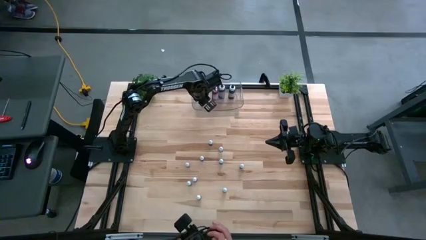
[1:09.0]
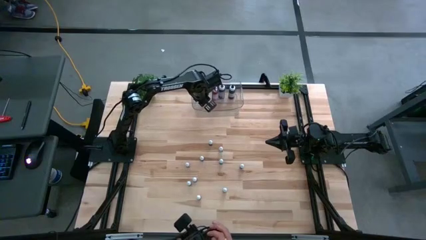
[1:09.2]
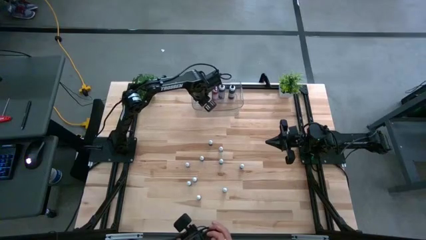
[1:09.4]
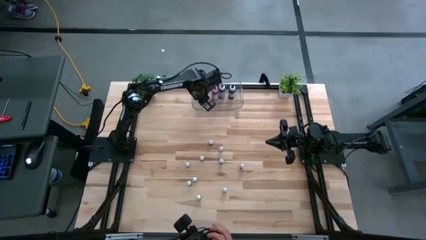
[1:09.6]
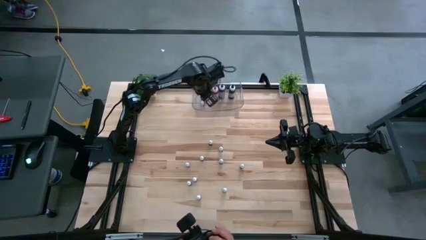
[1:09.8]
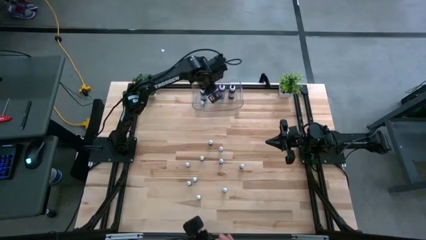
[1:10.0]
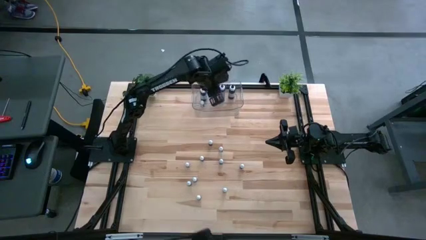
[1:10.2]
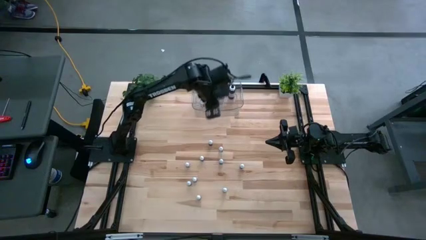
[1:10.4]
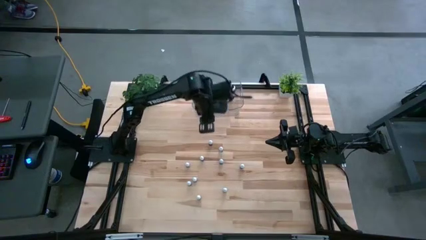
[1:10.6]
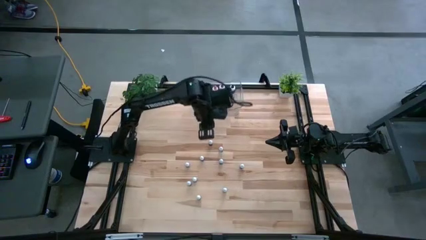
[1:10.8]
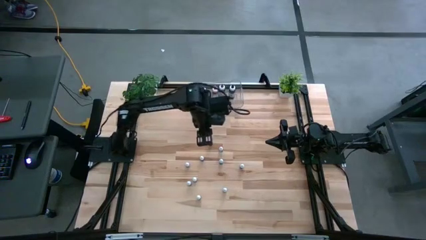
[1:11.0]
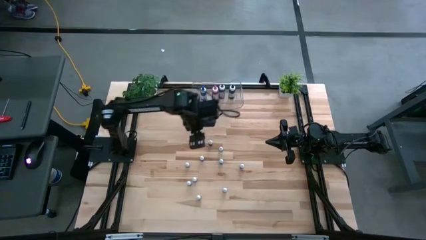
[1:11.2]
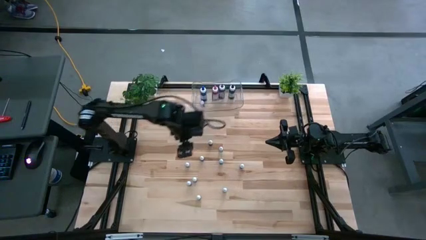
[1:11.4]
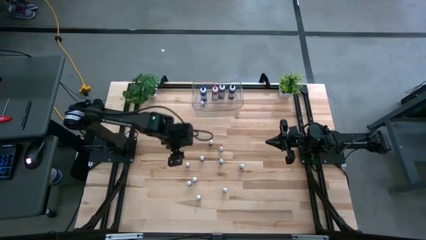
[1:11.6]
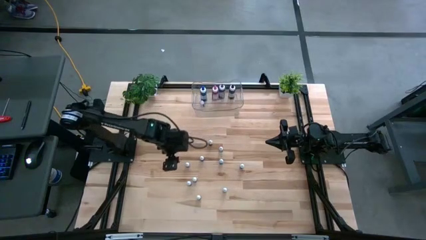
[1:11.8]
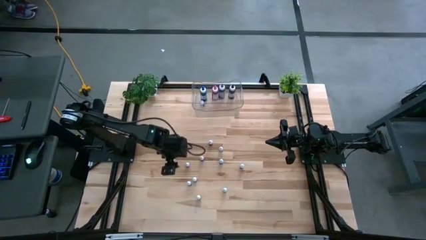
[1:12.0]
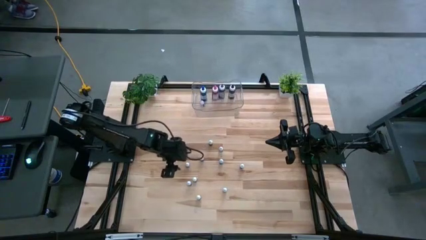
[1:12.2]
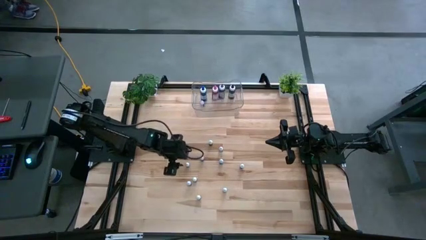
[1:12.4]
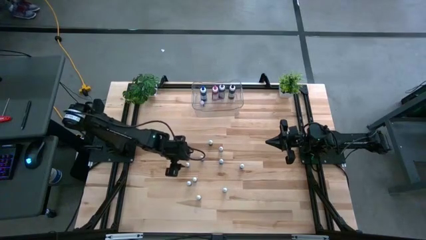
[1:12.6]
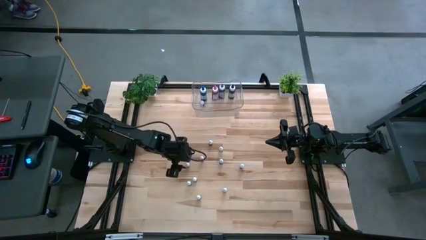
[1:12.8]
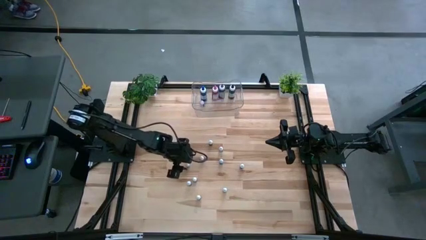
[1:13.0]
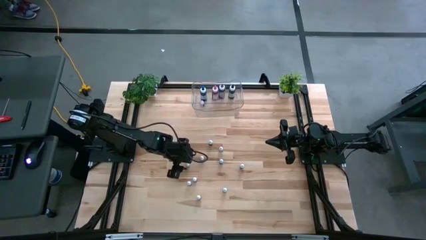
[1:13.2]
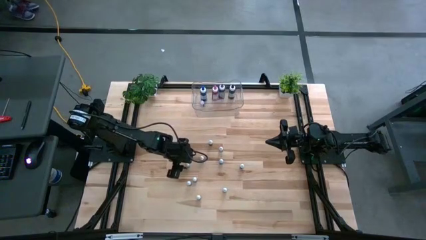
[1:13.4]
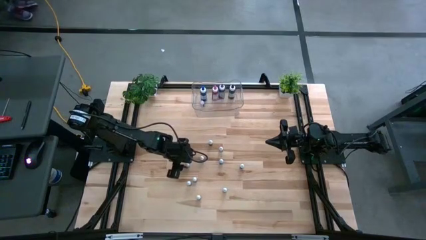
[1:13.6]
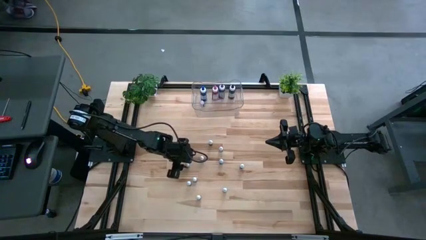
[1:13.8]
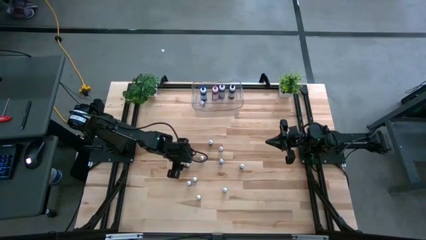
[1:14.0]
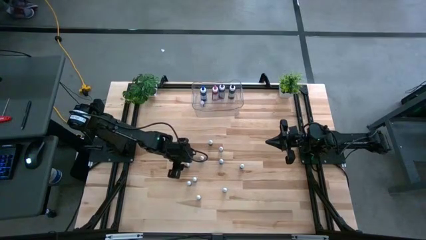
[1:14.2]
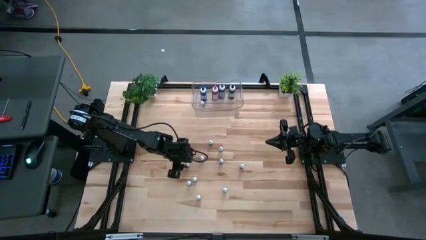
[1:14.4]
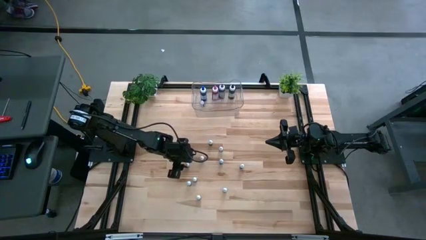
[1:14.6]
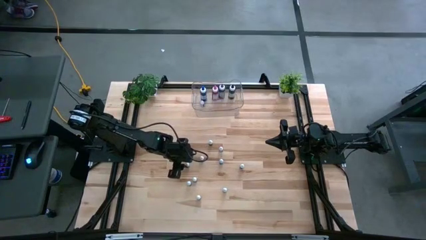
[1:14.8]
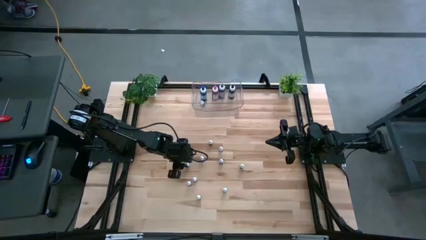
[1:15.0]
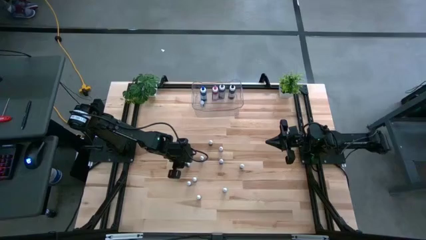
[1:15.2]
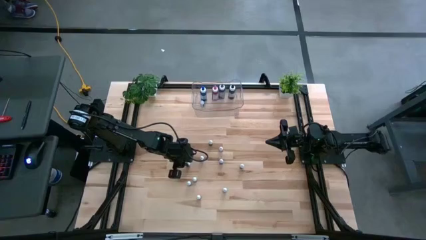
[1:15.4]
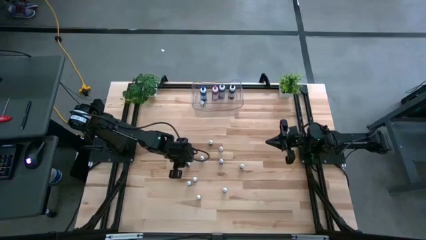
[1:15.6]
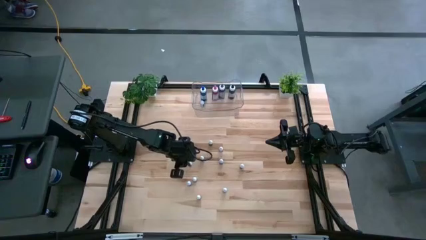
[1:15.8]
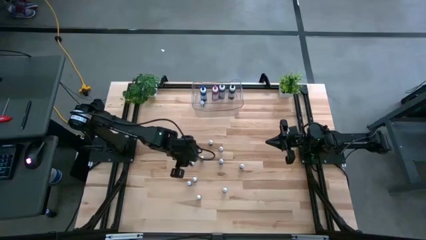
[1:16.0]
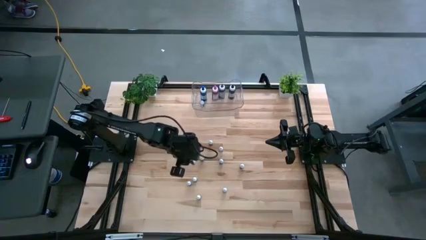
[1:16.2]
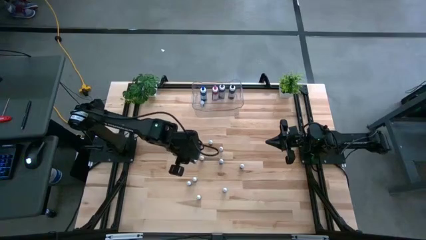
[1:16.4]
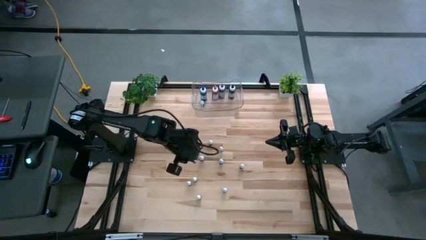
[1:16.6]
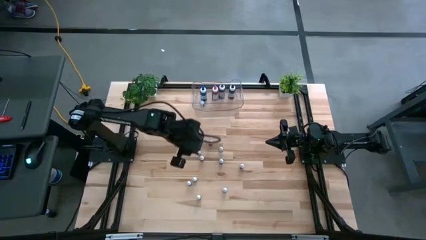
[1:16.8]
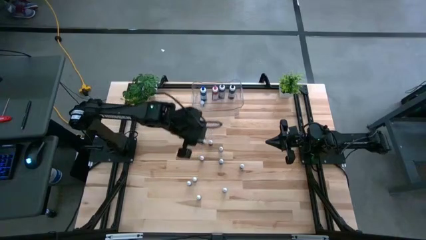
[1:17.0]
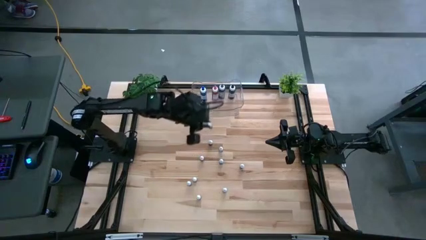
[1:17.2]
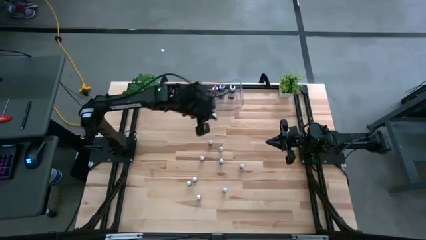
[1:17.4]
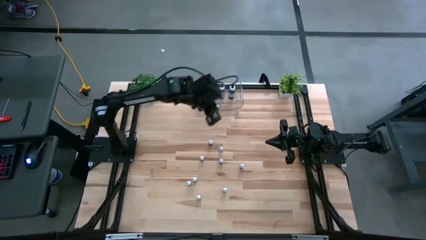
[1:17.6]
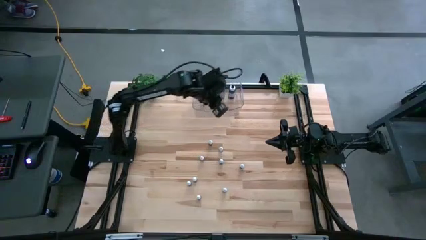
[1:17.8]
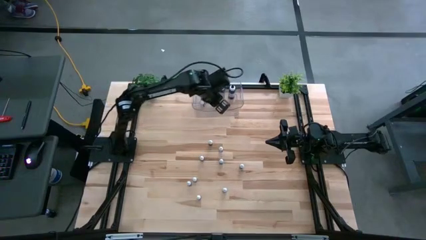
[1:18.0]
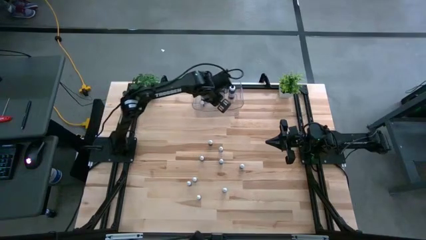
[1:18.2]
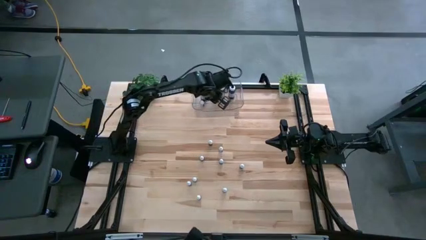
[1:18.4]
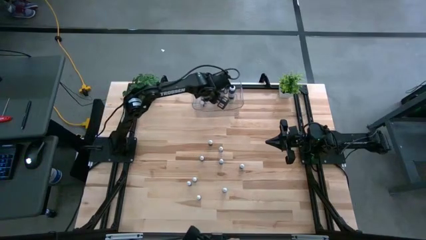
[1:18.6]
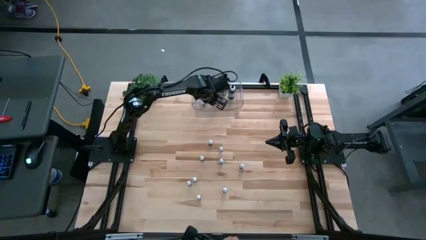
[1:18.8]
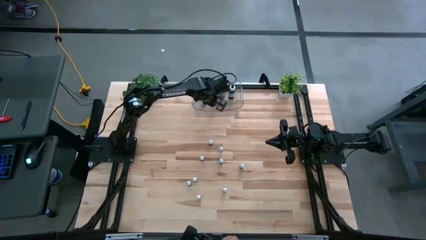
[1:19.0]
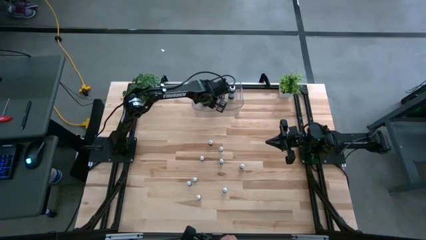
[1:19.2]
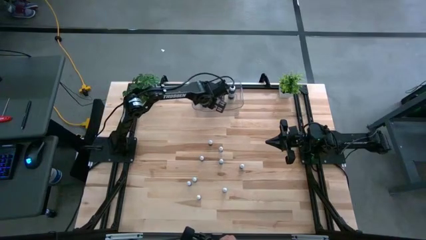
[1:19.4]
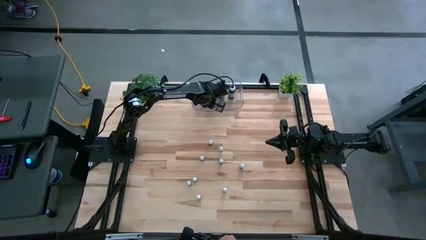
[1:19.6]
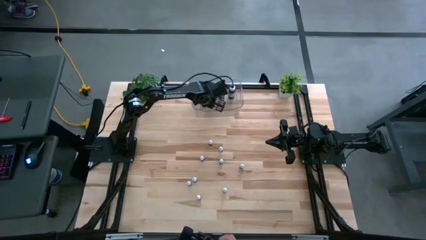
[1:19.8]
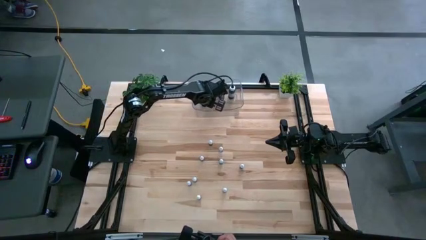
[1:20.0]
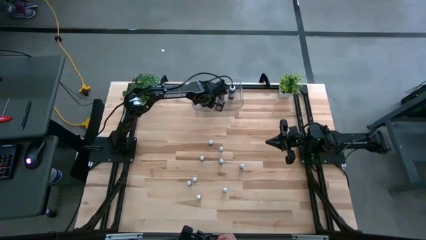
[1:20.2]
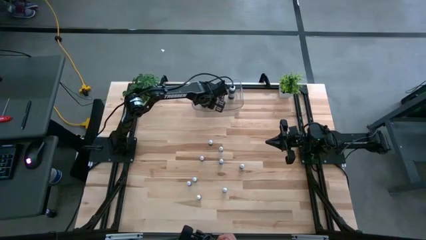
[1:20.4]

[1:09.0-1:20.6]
Task: Pick & Place food coloring
Put the top small green food coloring bottle into the transparent bin
